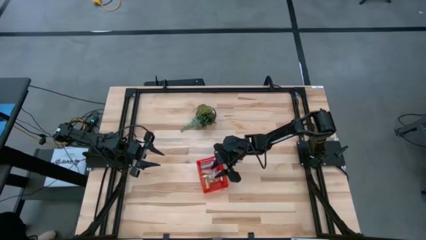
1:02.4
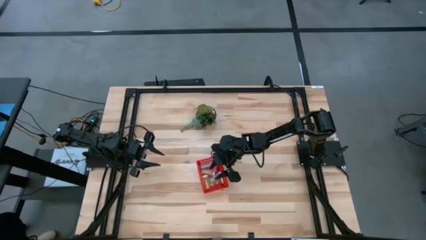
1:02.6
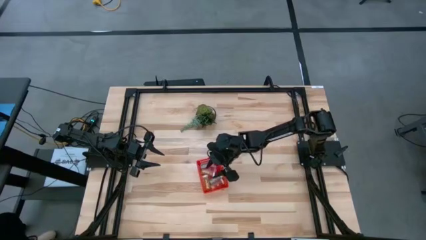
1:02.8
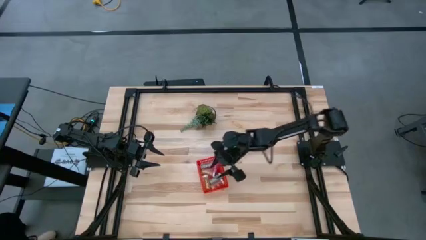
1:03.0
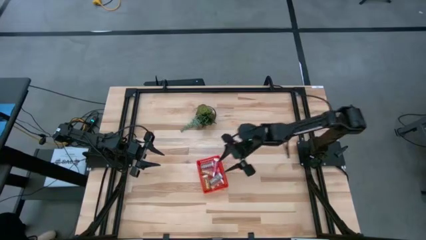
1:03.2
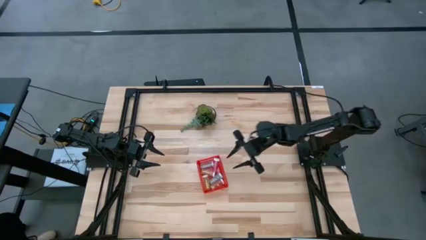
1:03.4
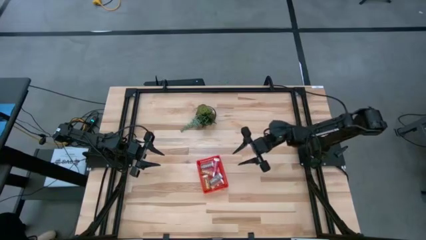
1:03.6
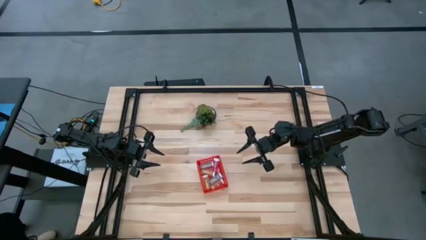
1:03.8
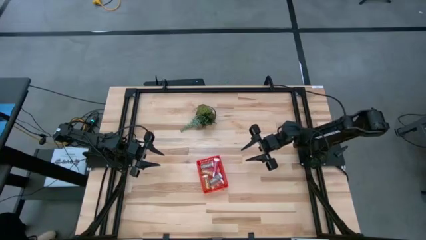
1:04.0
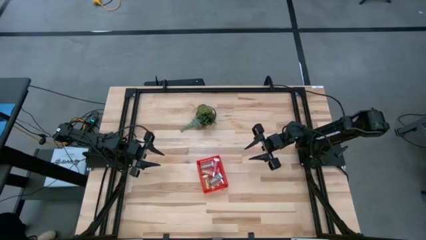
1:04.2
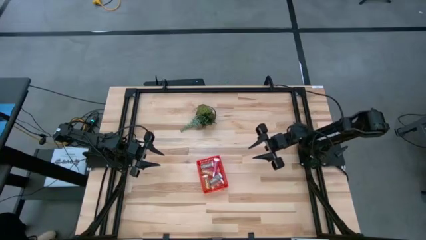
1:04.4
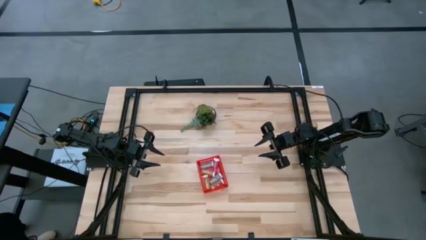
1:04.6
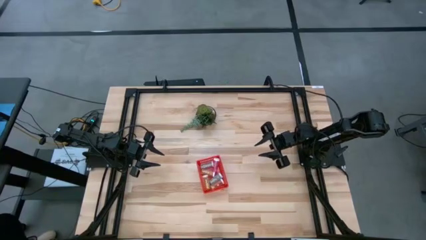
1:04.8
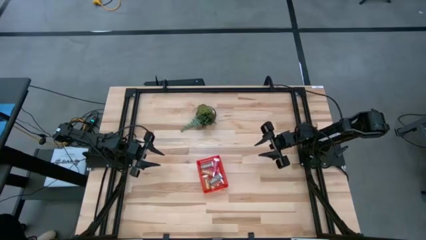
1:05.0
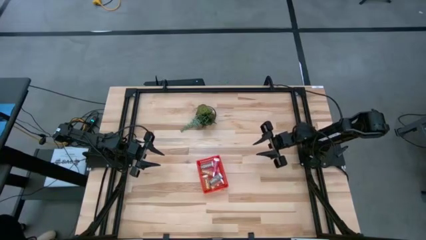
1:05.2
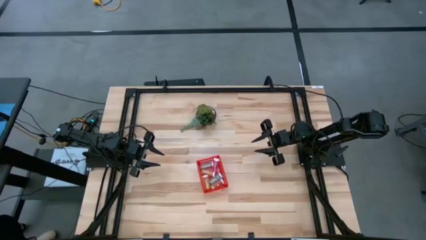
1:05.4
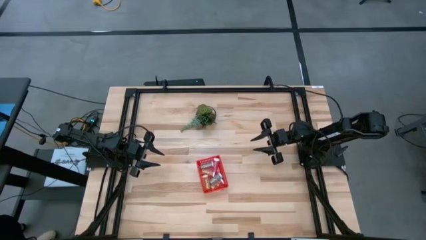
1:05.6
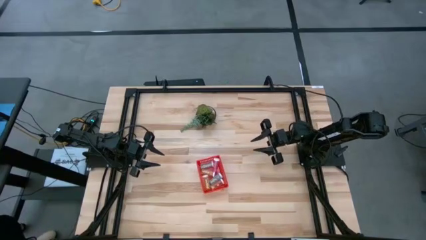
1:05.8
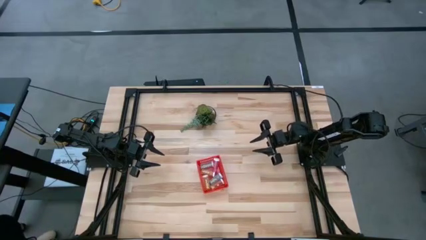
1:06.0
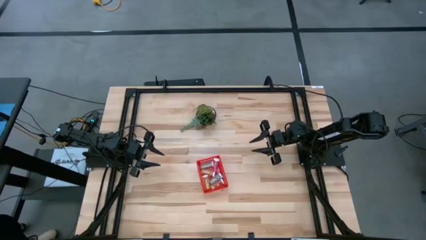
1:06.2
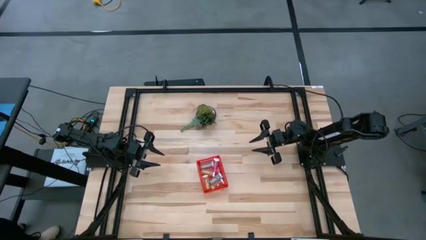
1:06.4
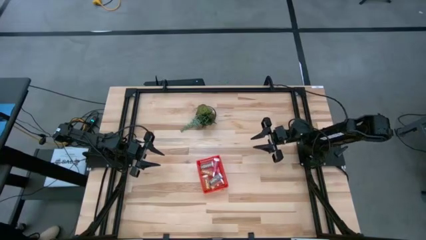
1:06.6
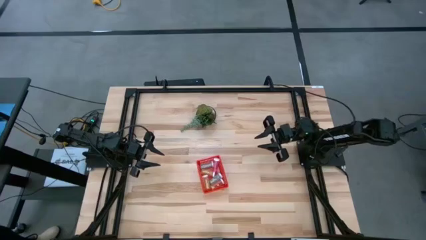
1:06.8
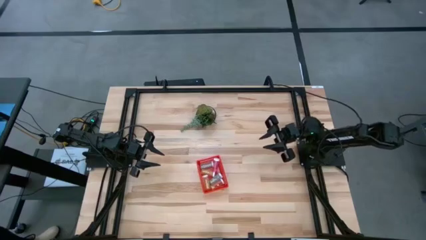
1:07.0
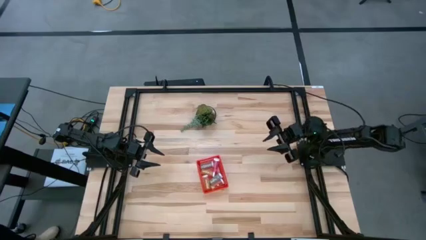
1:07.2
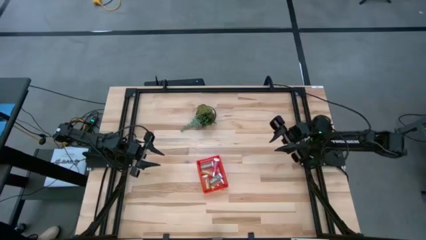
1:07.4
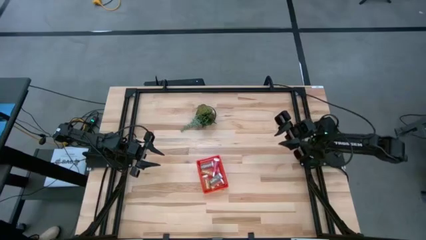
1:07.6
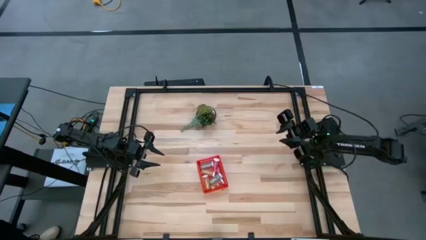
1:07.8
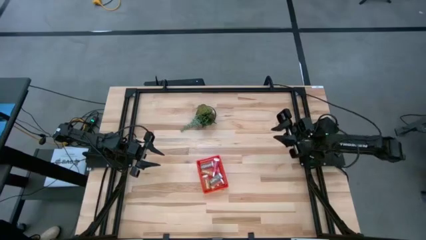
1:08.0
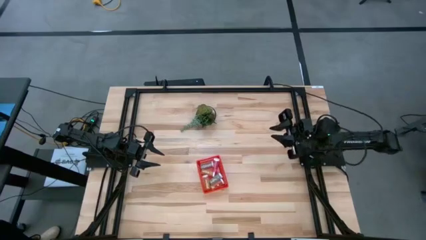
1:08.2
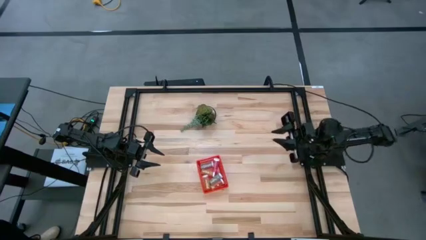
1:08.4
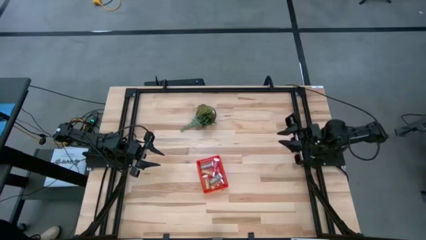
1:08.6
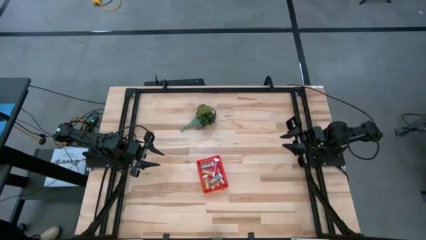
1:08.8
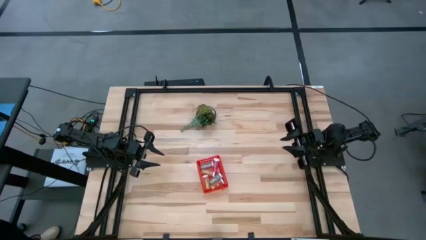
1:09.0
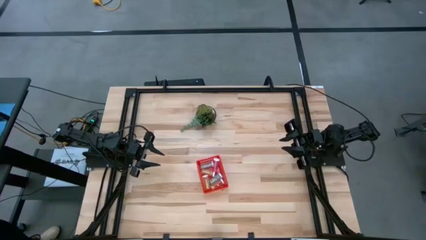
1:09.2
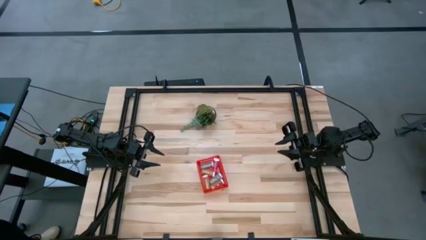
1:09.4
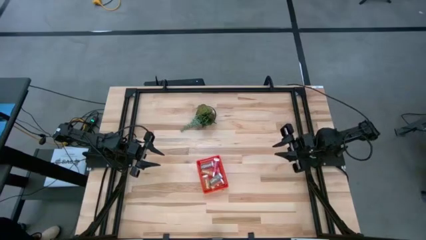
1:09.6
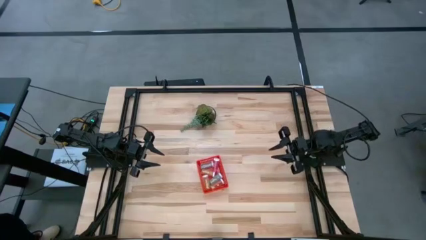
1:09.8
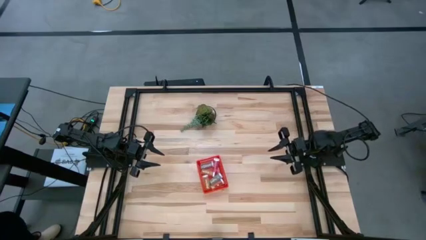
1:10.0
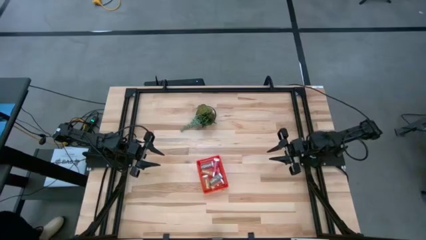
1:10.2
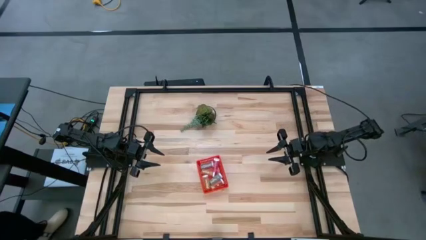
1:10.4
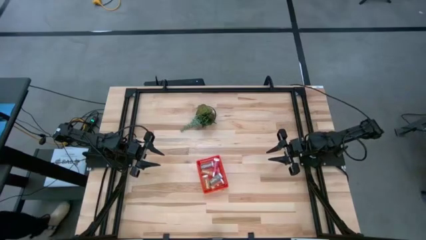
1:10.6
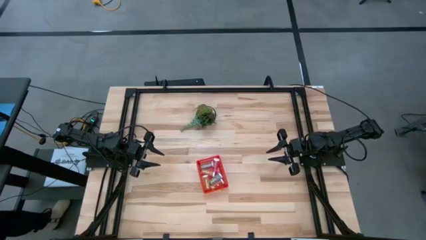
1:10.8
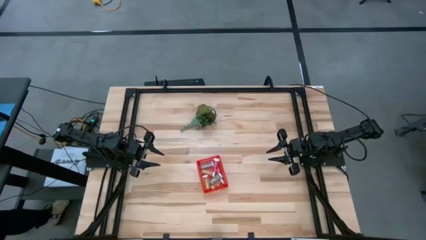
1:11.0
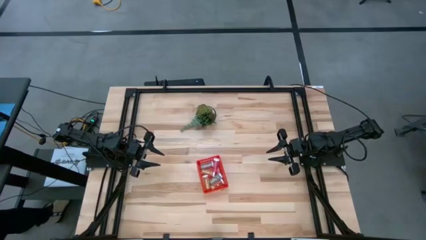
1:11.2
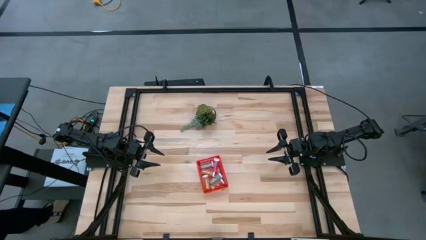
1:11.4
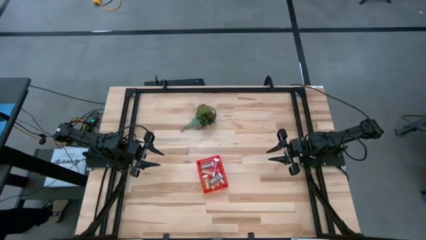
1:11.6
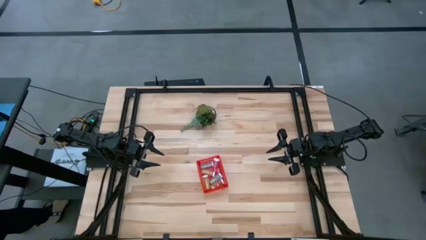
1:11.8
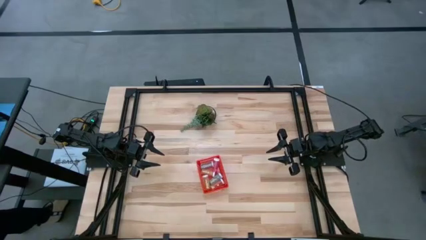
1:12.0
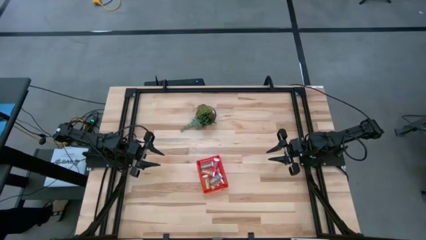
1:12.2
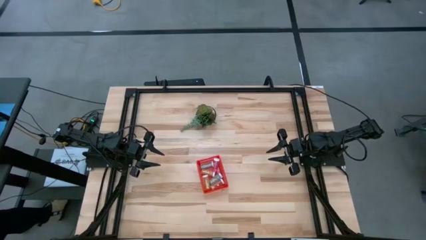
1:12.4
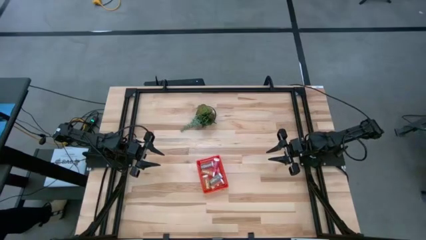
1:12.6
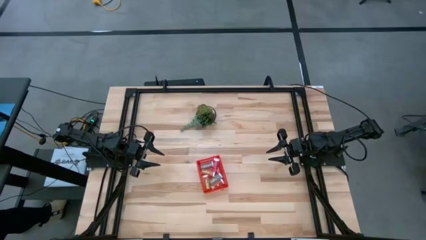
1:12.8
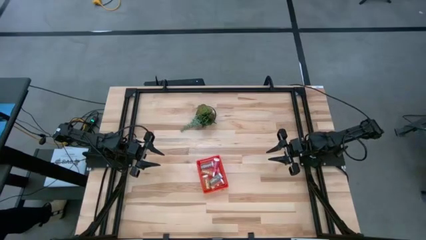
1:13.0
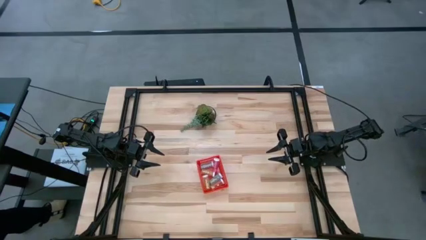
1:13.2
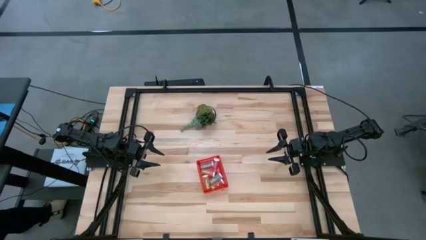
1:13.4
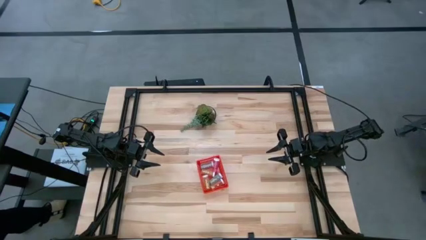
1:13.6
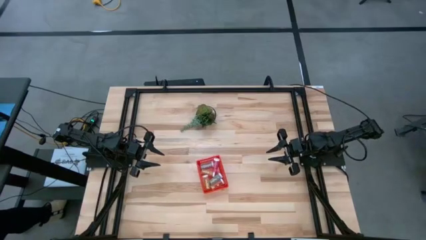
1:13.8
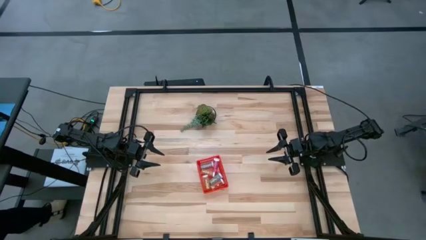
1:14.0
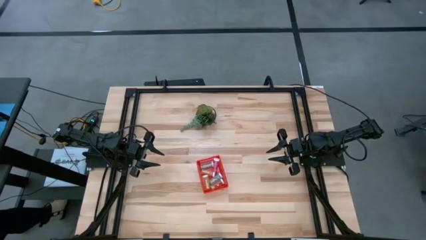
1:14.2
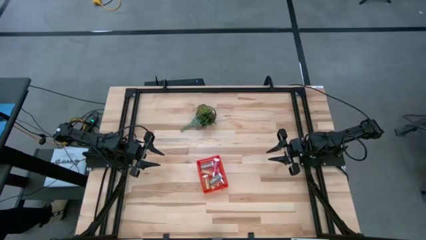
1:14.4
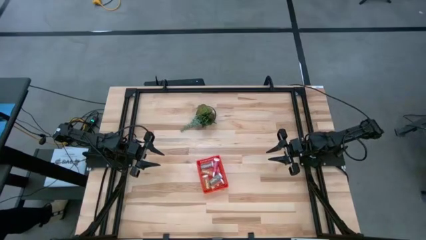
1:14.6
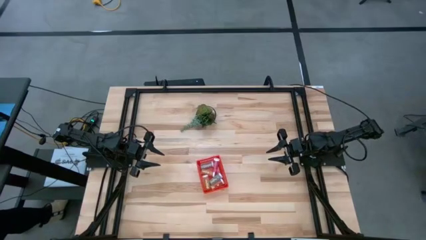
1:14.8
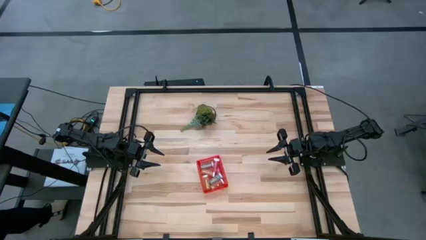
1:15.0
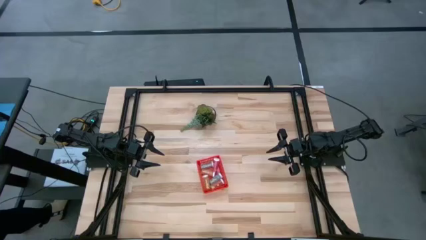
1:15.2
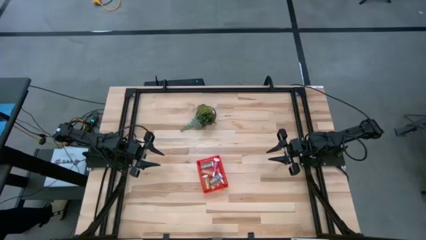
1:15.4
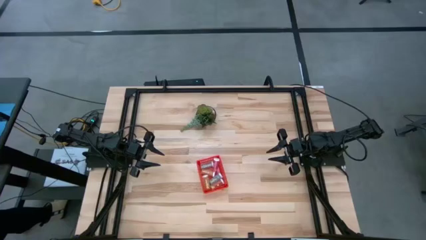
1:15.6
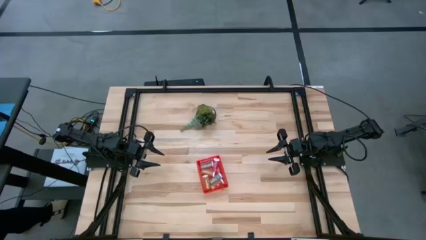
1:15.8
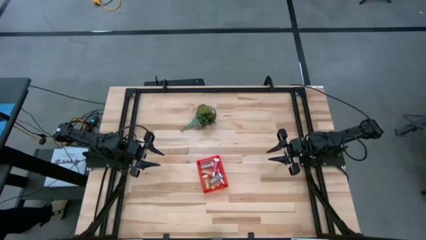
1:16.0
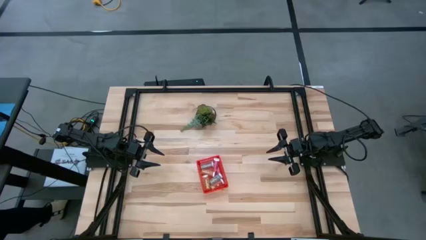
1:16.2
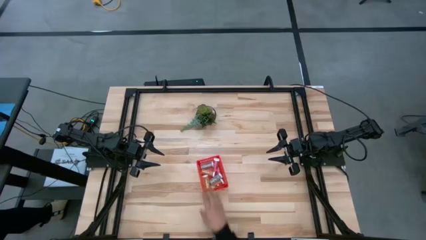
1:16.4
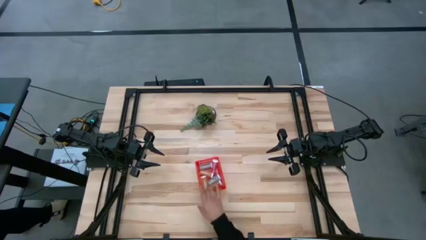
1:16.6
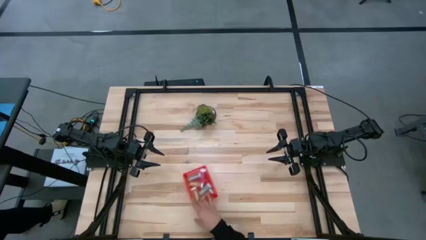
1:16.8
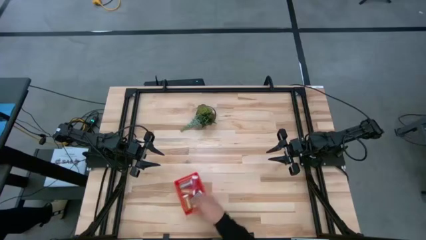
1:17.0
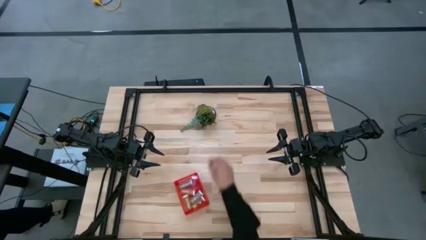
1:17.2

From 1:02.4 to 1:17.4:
Task: Pick and place pill bottles into a basket
Return to Home Position

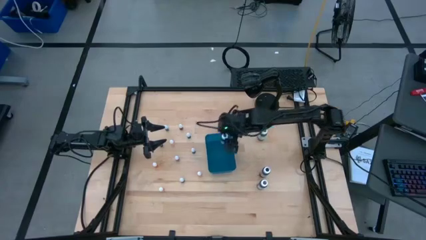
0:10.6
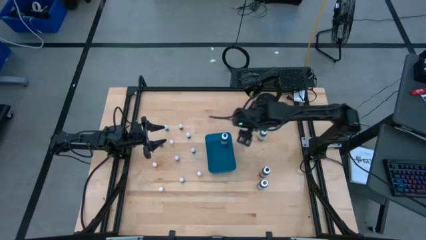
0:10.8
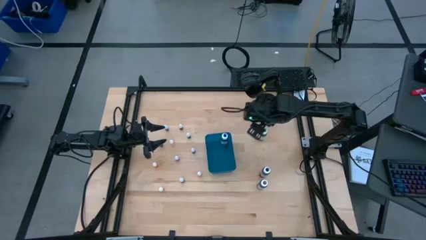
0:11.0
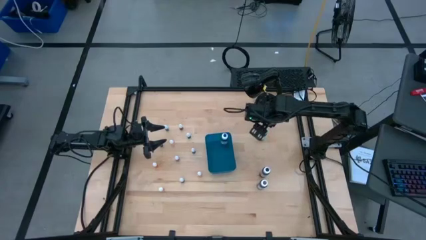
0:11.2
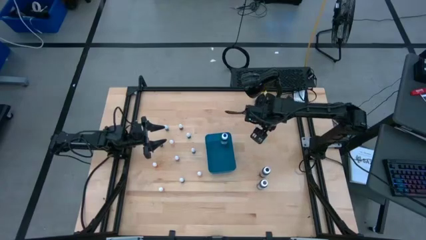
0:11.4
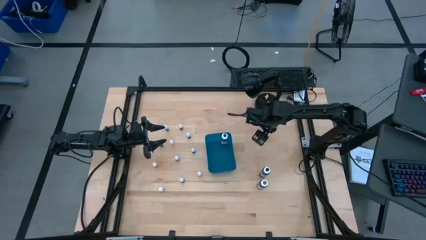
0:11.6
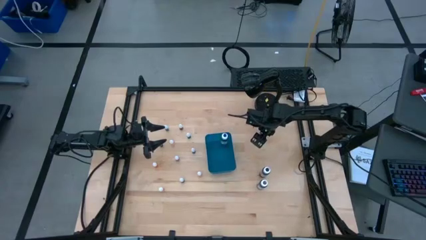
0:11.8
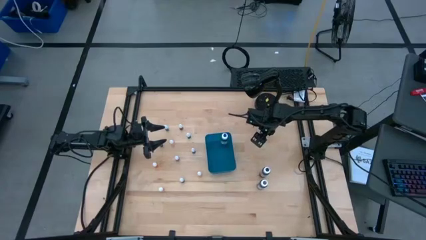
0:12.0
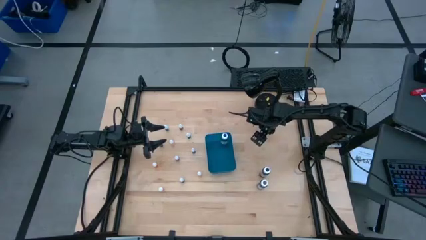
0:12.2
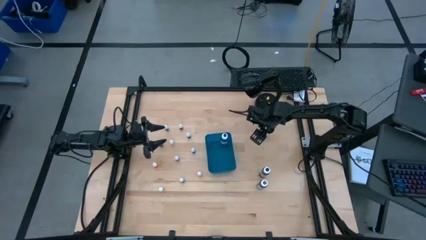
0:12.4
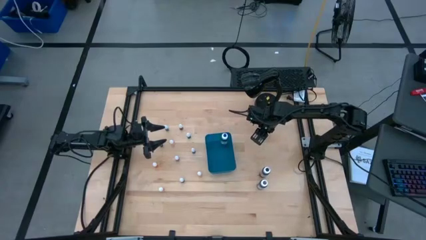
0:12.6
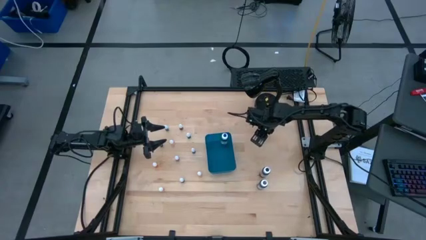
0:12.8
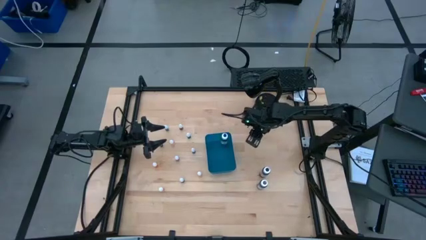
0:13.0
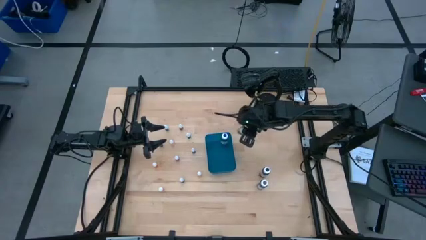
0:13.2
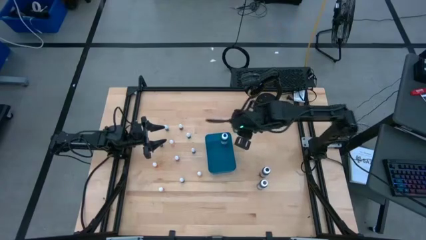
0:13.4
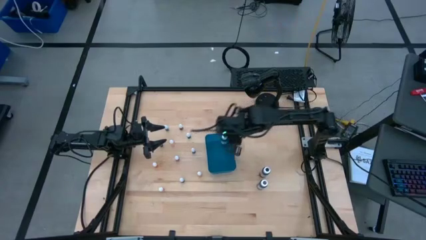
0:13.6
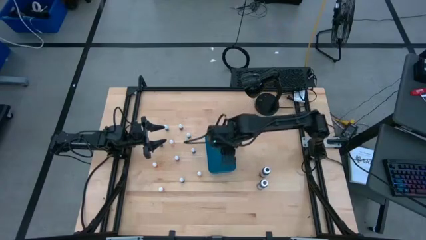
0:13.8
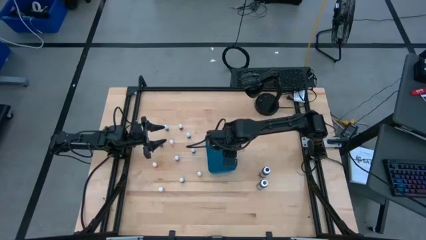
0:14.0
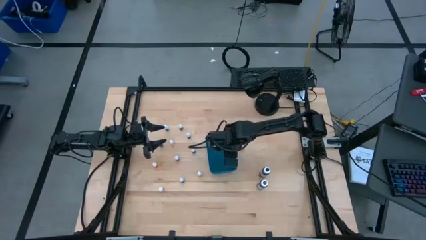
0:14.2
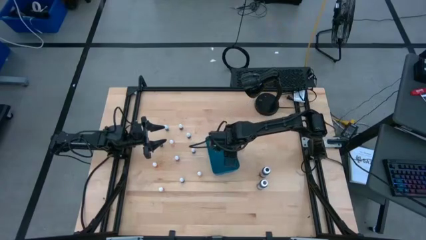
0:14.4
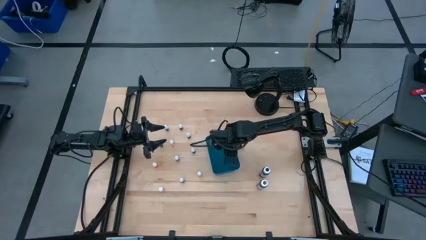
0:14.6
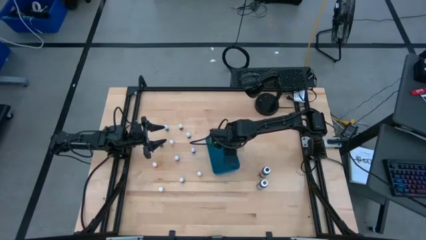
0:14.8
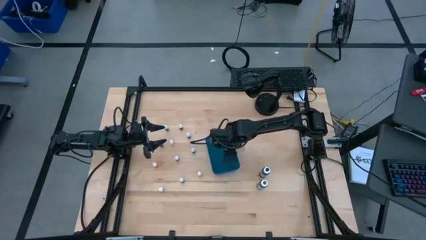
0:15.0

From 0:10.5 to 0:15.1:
Task: Pick & Place food coloring
Put the large green food coloring bottle into the blue container
